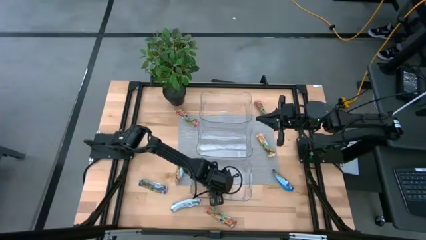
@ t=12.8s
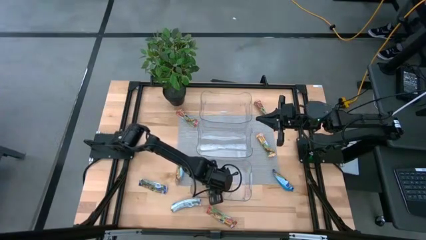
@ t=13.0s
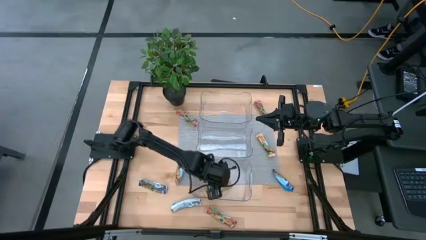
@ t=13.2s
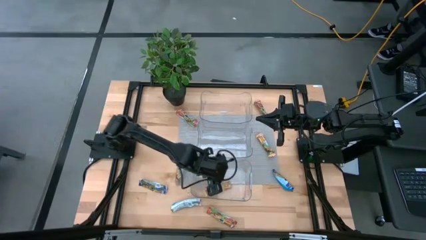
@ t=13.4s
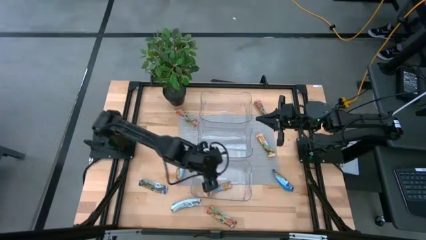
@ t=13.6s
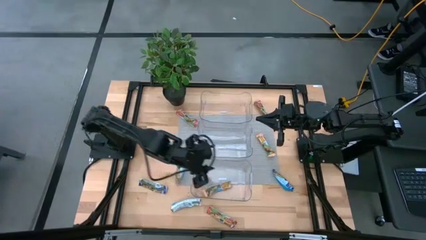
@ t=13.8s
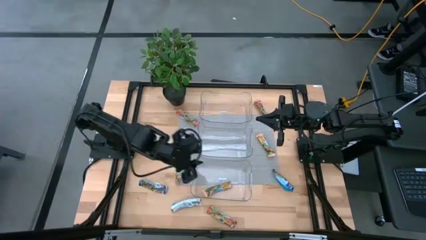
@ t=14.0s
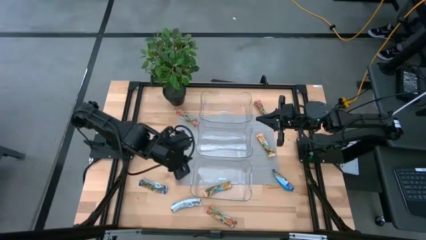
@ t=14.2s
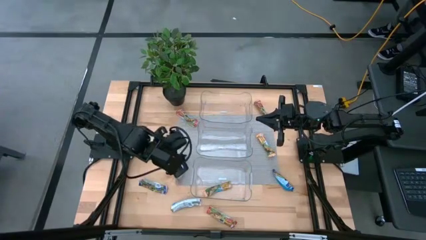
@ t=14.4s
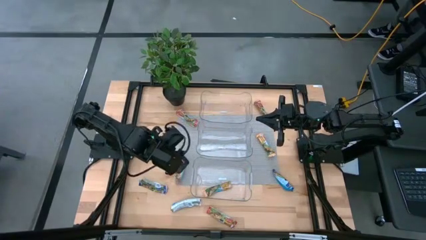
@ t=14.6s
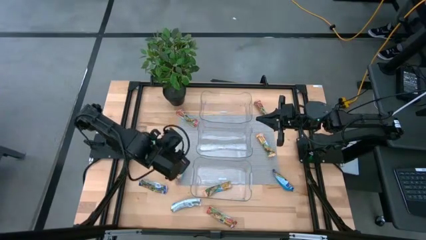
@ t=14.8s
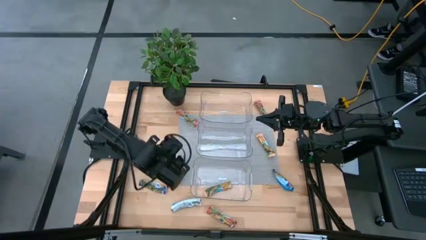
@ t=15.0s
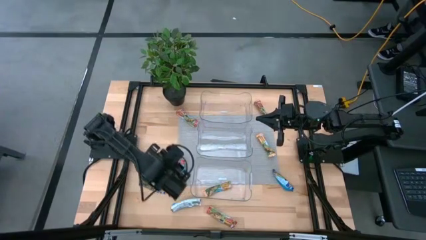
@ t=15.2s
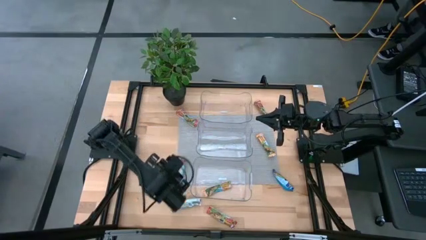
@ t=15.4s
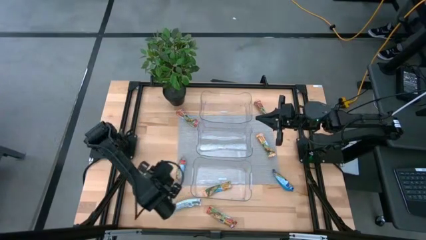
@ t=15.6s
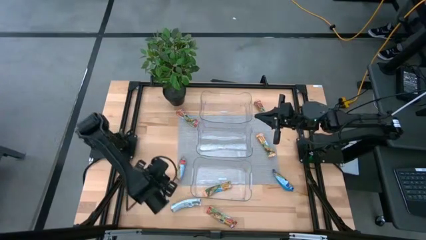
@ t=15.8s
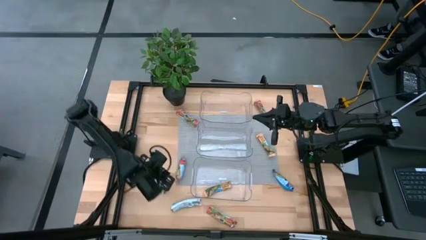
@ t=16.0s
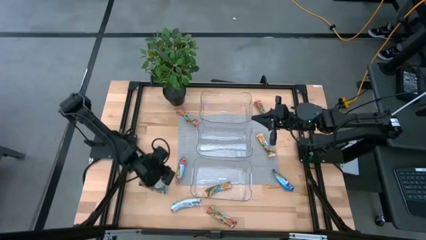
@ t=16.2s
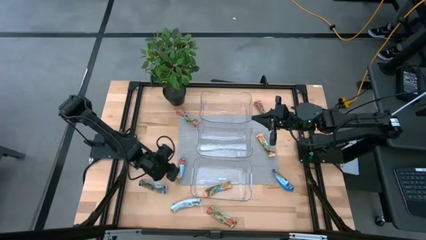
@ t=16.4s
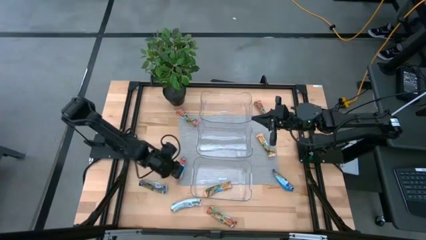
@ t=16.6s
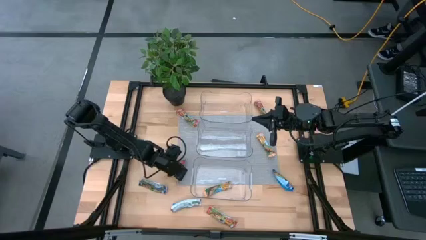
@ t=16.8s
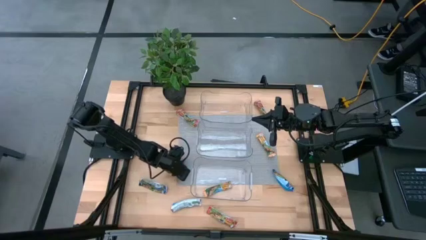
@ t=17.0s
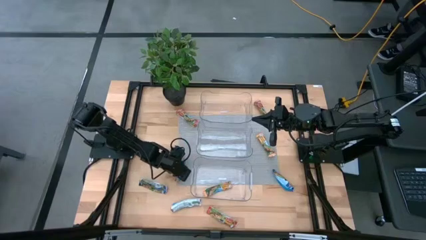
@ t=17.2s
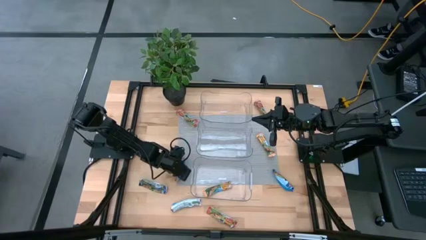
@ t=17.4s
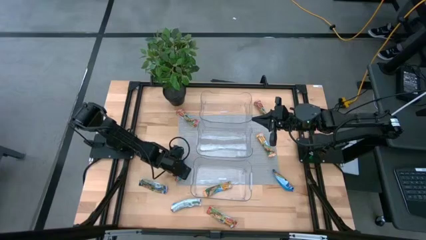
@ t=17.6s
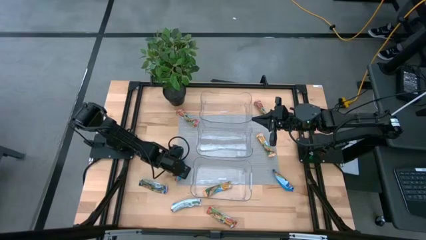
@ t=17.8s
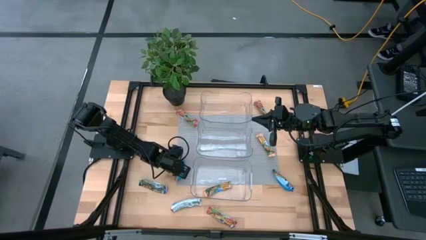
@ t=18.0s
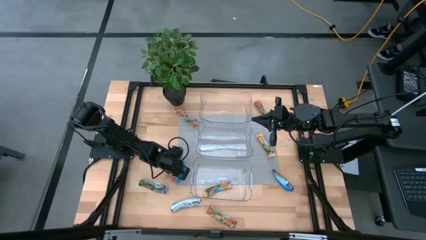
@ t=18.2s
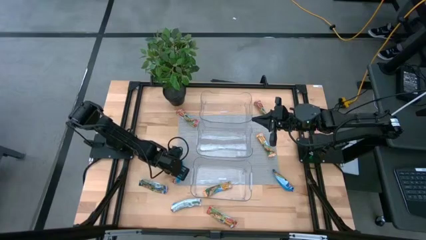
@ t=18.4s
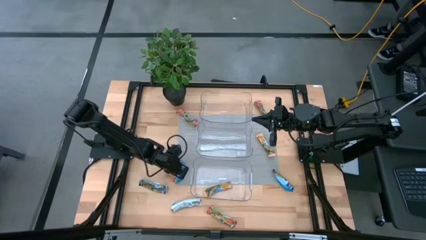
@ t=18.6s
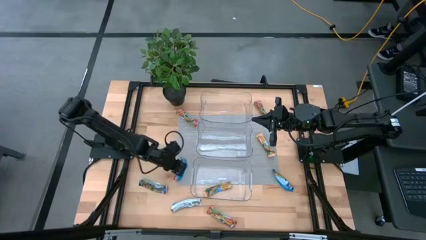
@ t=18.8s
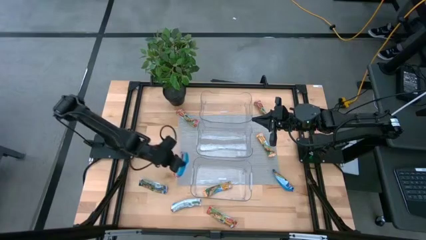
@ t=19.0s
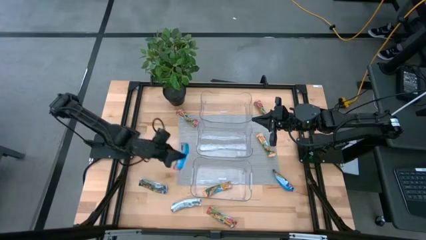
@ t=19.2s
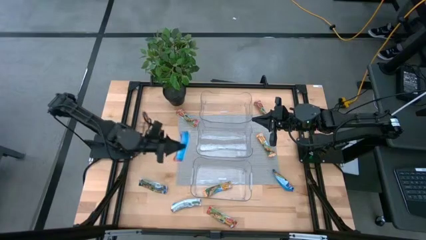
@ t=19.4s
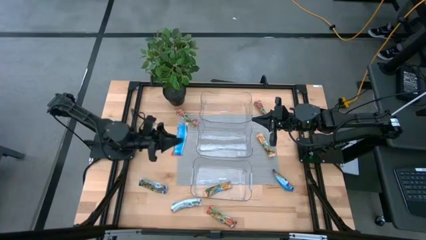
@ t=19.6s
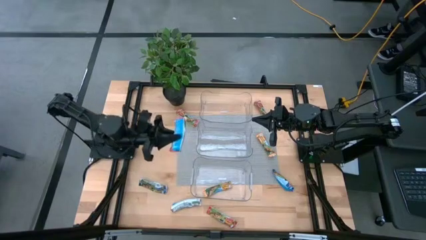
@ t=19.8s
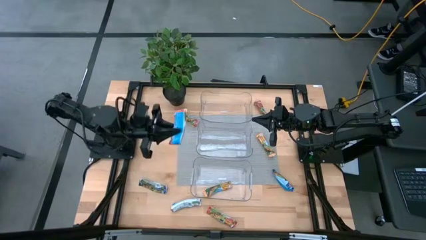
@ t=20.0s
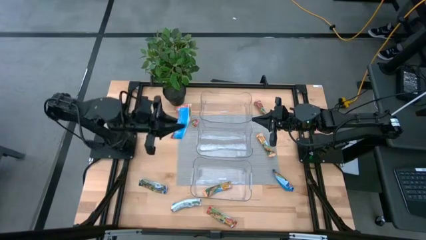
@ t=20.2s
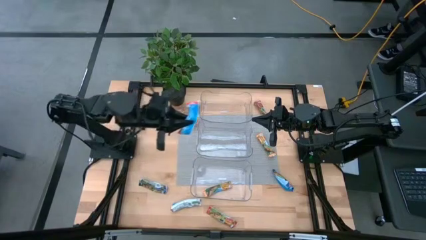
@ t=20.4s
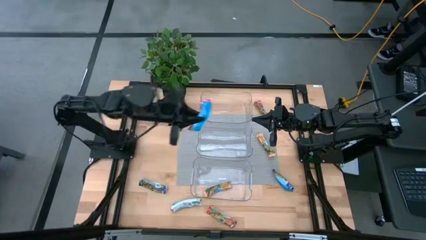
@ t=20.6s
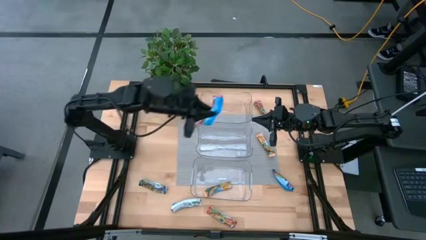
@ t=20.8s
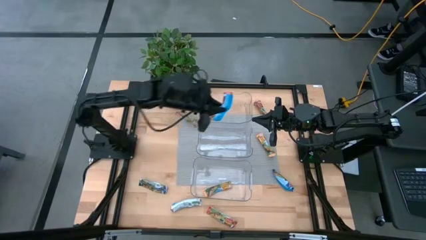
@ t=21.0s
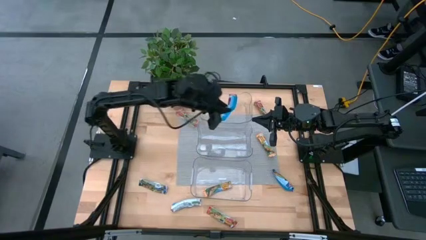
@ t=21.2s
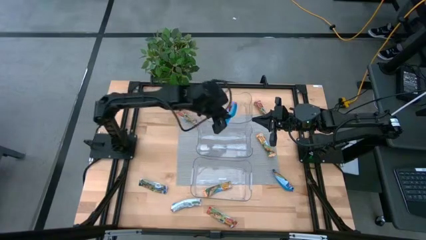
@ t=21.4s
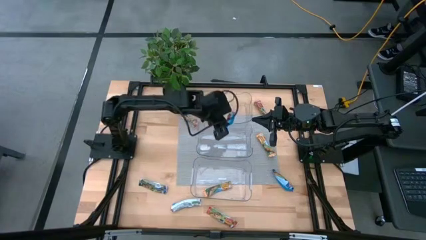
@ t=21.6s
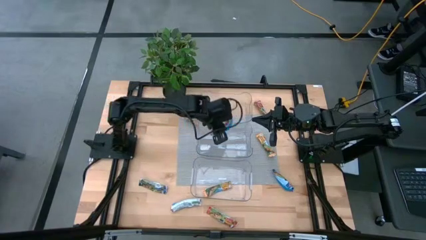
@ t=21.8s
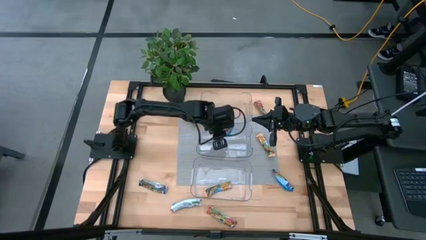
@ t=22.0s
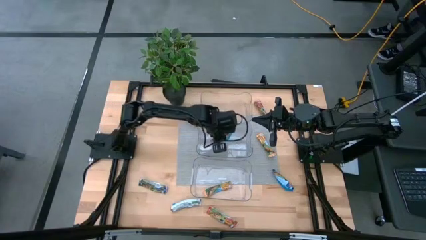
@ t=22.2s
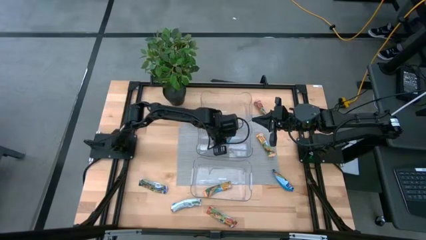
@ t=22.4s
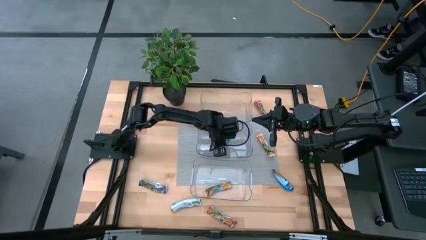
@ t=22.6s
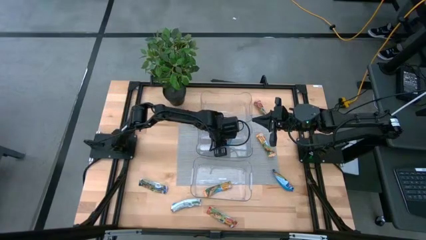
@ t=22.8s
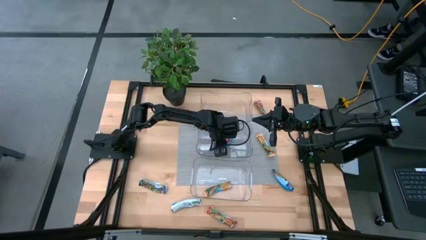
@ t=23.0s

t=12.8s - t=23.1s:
Task: Pick and place Granola Bars by type
Put the red granola bar into the middle transparent bin

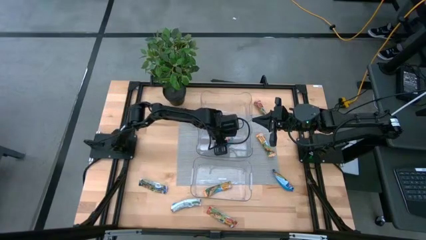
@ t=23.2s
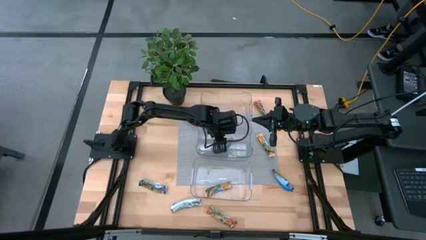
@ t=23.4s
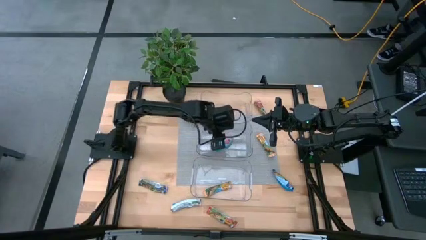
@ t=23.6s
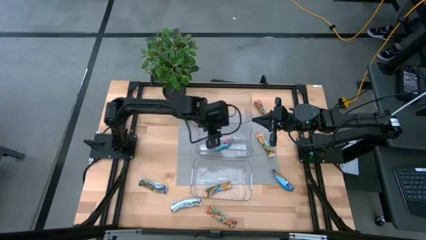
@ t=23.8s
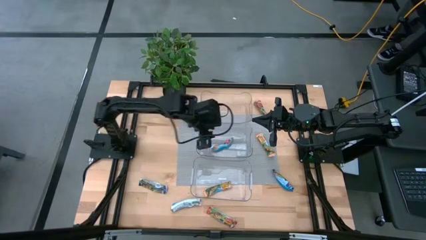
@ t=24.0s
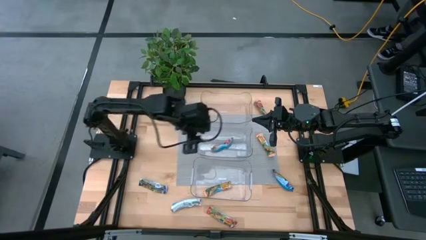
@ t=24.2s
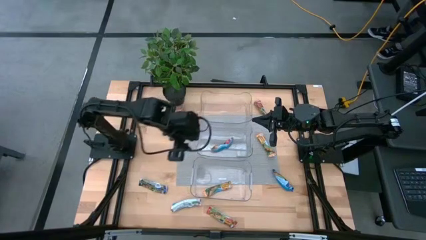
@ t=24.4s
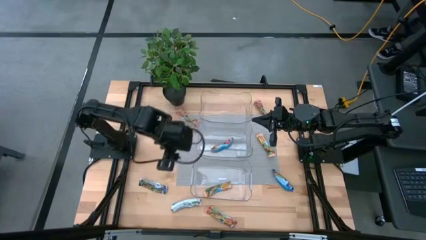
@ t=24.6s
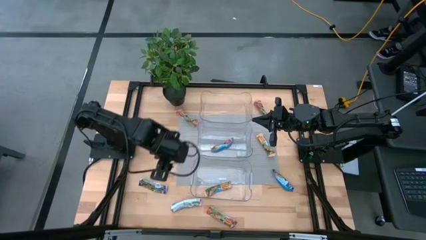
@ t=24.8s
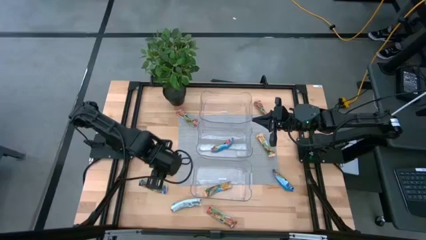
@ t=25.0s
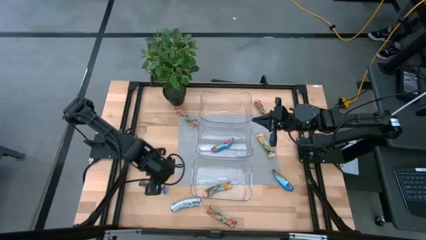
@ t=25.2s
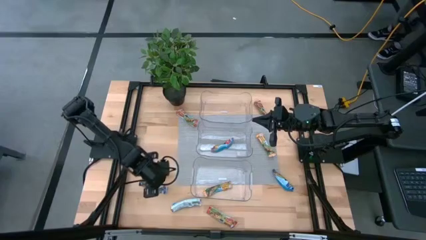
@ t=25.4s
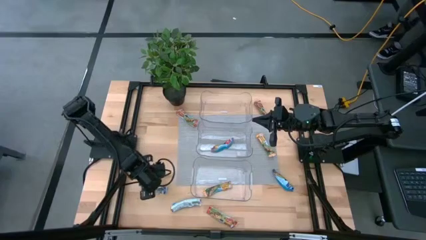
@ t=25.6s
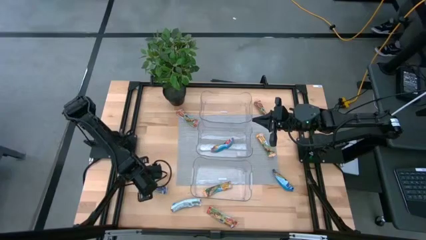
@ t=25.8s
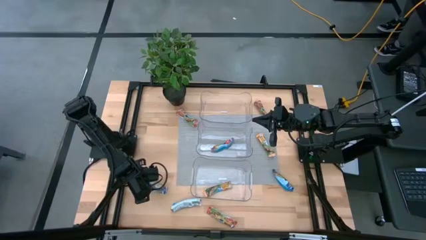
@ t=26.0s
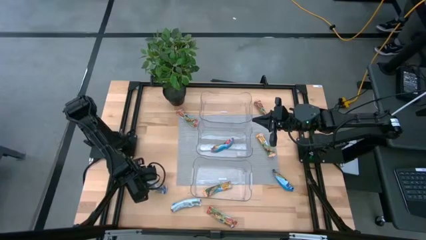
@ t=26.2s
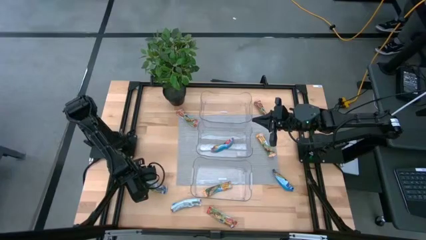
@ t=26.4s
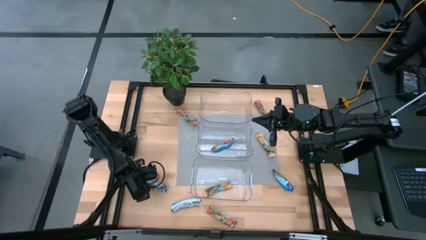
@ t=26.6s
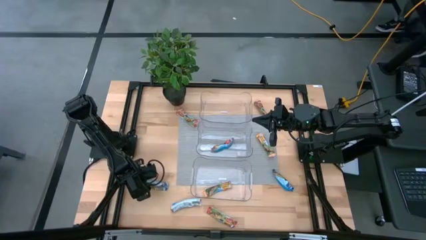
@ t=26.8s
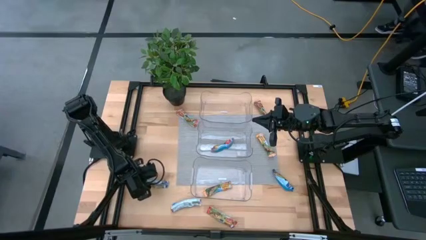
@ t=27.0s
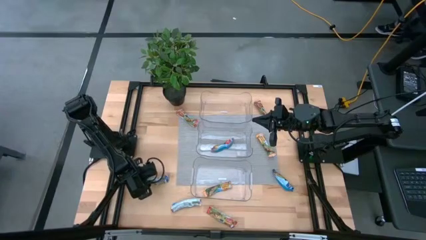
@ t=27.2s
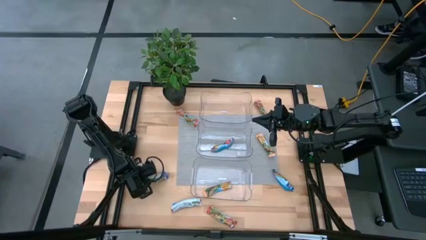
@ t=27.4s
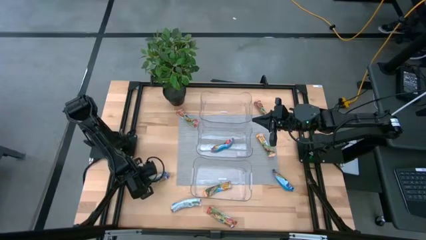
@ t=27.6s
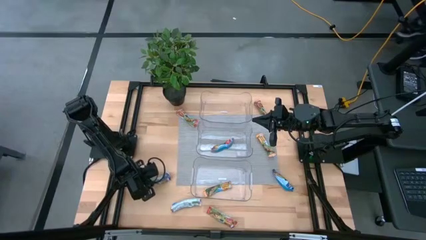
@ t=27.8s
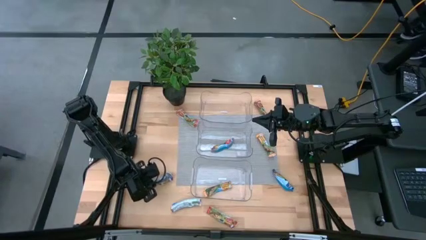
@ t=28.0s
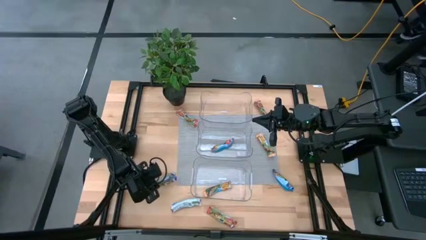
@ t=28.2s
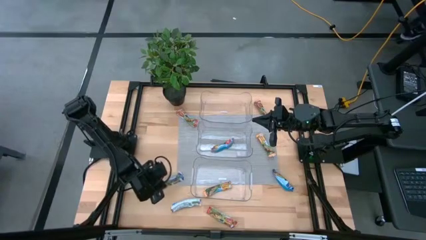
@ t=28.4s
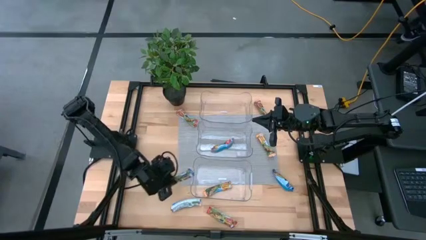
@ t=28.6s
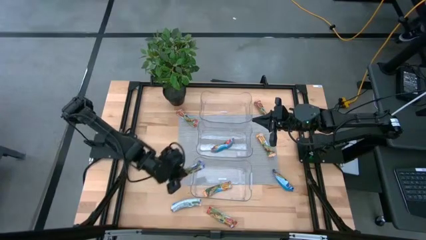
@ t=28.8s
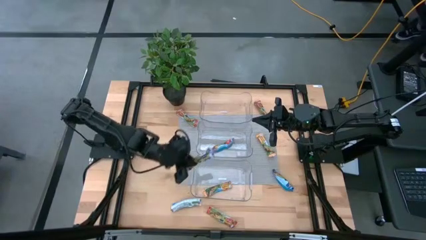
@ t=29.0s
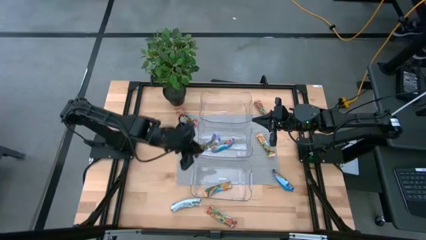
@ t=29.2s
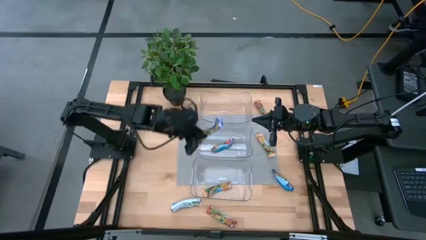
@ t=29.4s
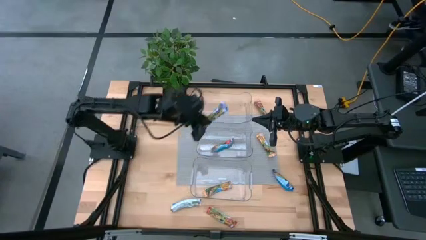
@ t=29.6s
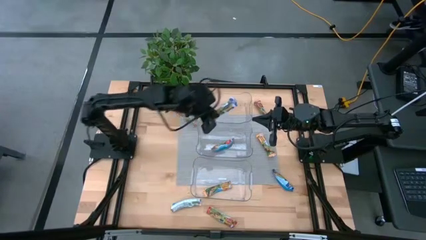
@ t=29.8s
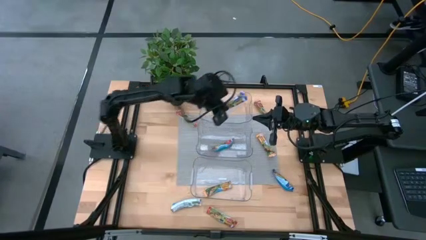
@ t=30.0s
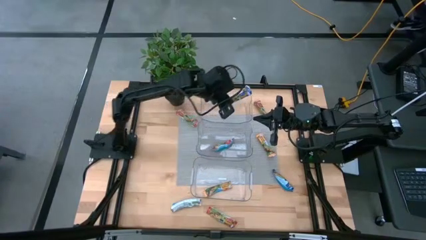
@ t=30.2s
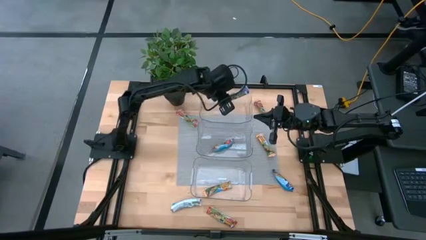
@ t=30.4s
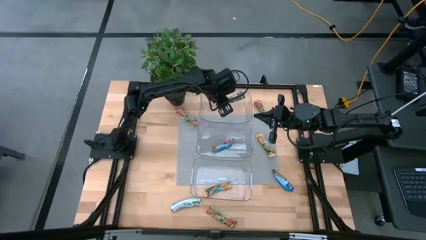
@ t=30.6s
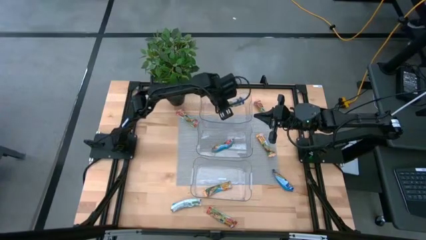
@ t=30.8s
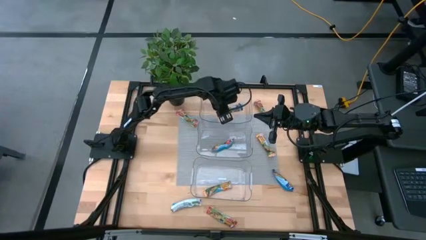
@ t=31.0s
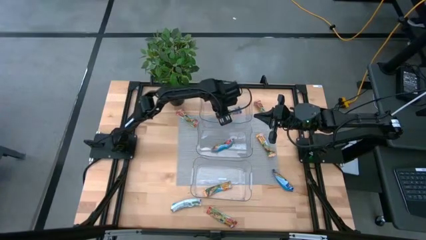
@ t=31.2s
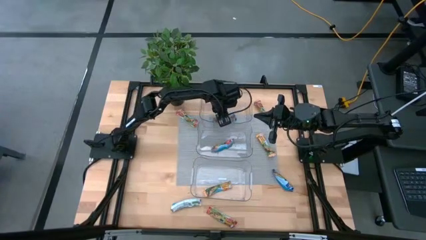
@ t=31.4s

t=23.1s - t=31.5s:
Put the blue granola bar into the top transparent bin
